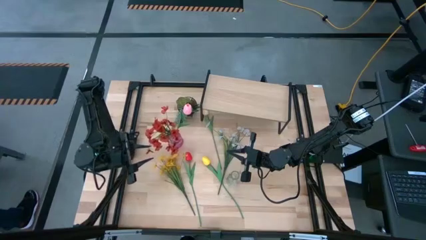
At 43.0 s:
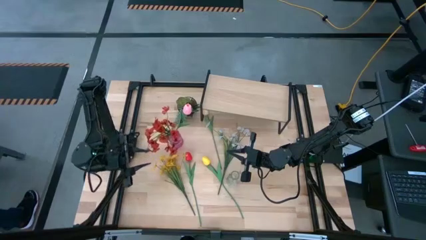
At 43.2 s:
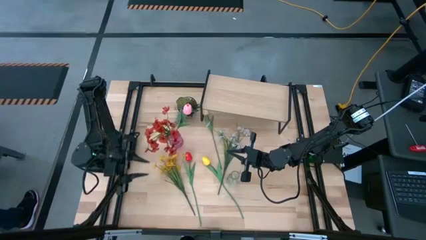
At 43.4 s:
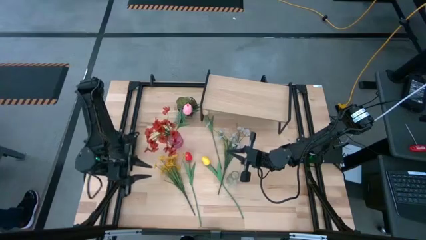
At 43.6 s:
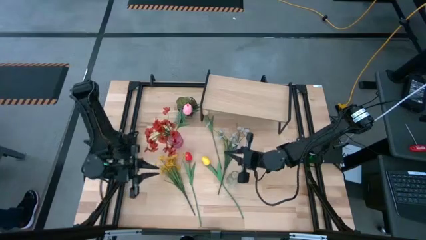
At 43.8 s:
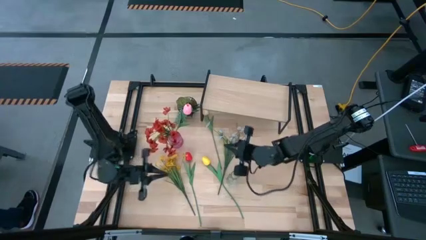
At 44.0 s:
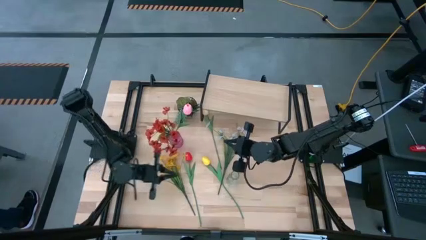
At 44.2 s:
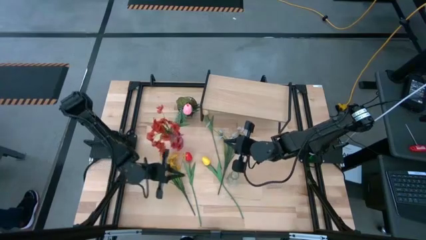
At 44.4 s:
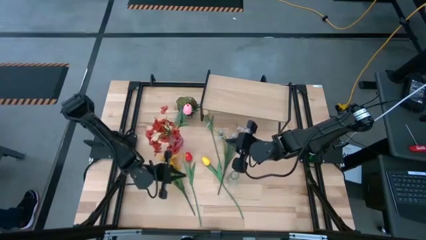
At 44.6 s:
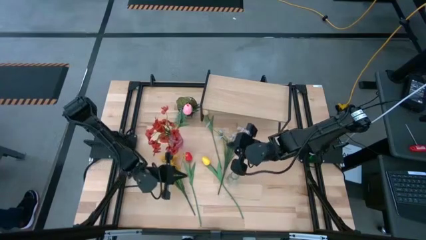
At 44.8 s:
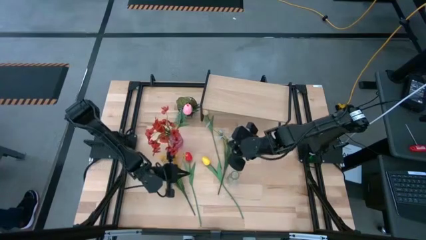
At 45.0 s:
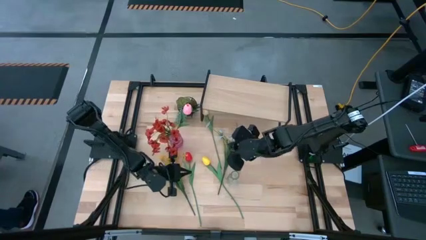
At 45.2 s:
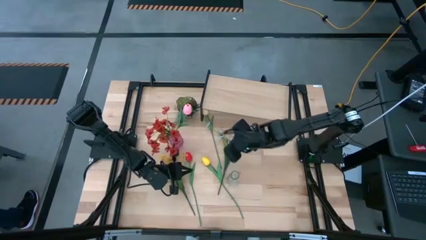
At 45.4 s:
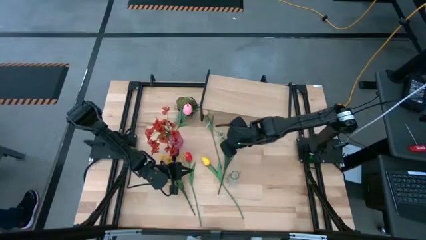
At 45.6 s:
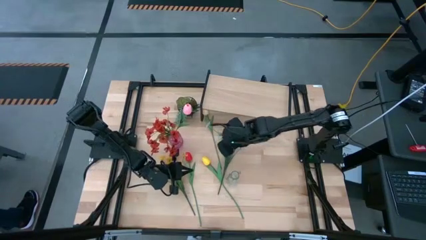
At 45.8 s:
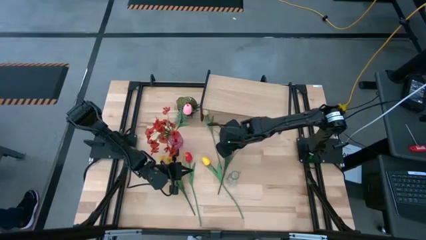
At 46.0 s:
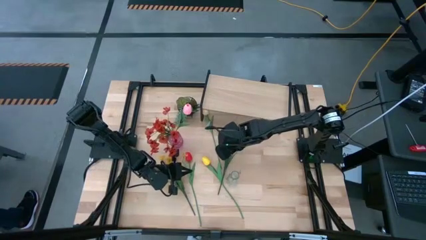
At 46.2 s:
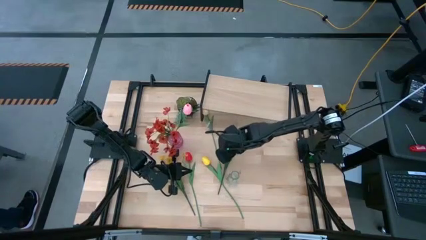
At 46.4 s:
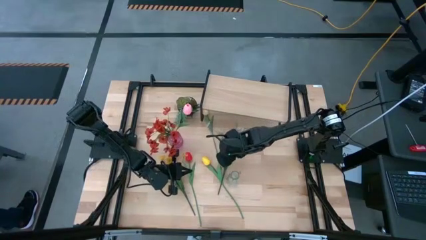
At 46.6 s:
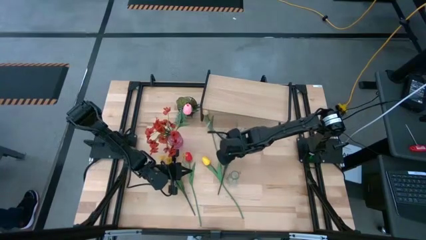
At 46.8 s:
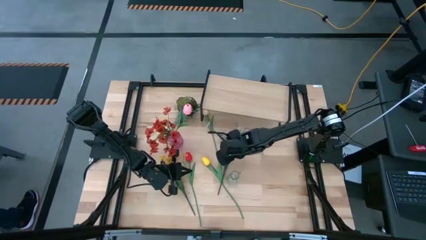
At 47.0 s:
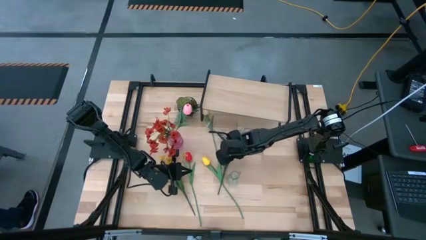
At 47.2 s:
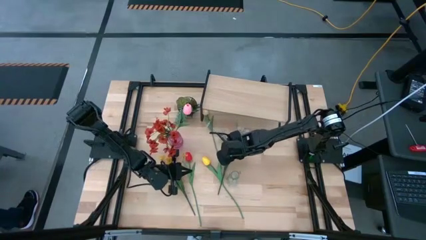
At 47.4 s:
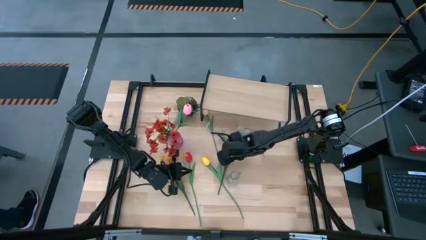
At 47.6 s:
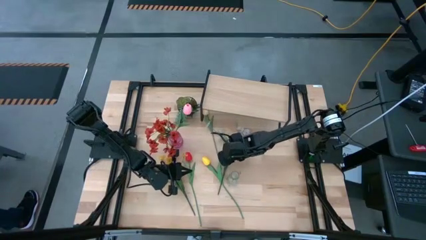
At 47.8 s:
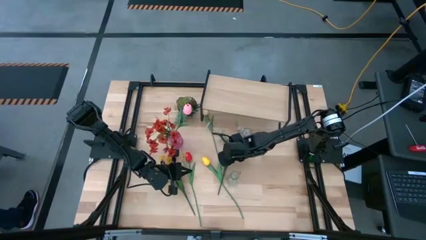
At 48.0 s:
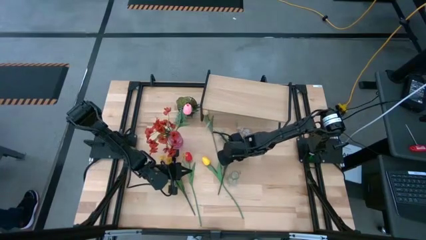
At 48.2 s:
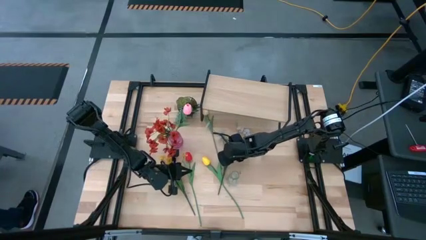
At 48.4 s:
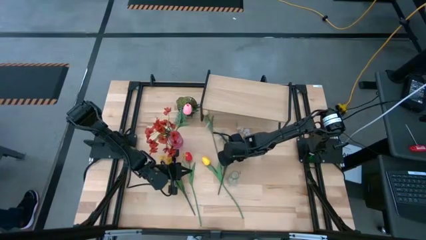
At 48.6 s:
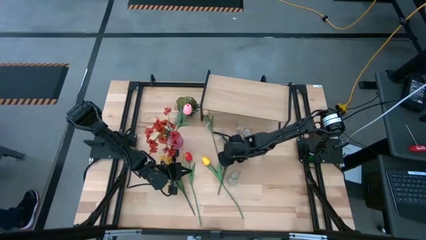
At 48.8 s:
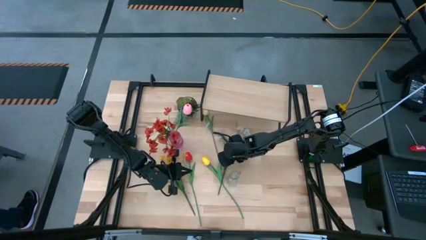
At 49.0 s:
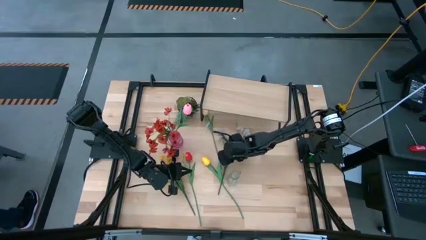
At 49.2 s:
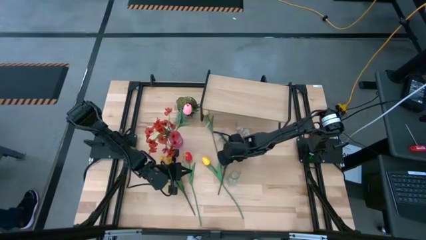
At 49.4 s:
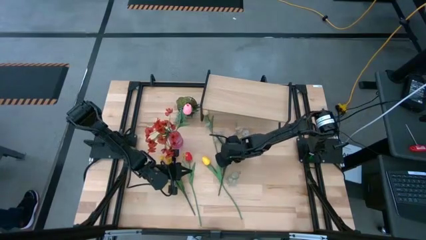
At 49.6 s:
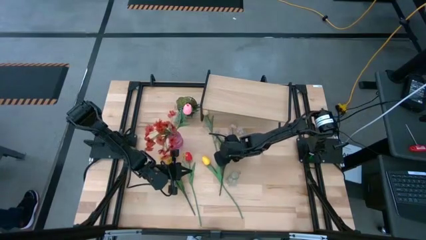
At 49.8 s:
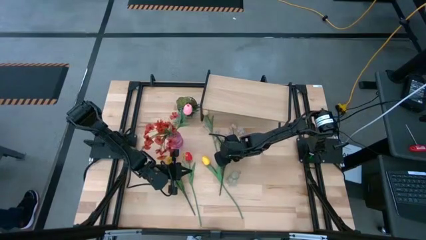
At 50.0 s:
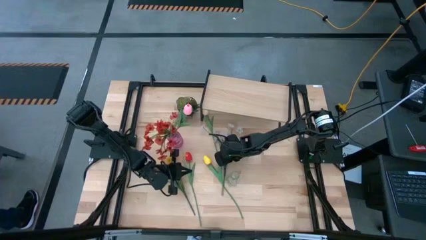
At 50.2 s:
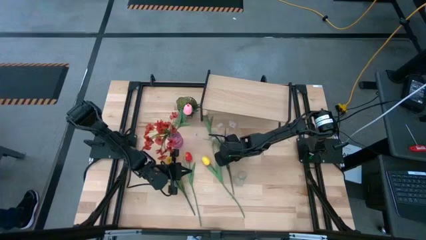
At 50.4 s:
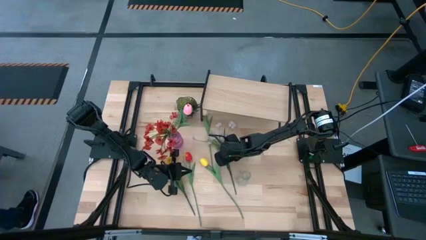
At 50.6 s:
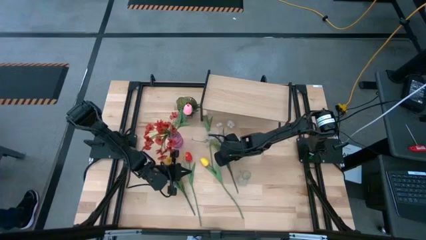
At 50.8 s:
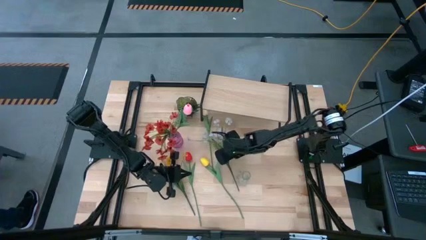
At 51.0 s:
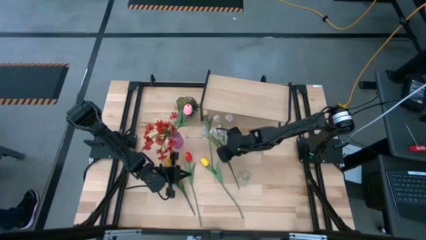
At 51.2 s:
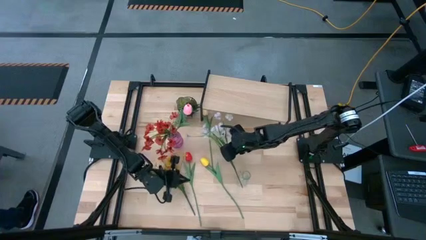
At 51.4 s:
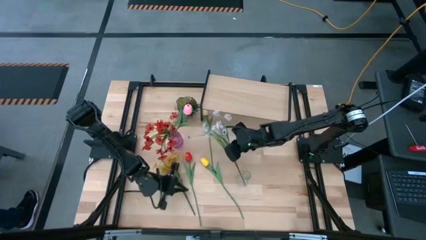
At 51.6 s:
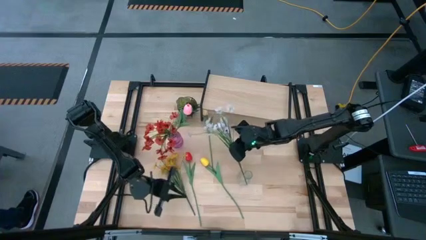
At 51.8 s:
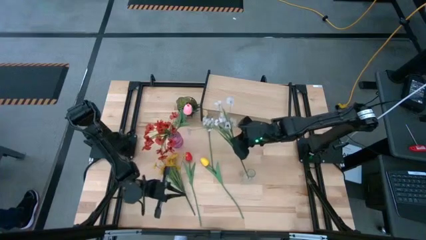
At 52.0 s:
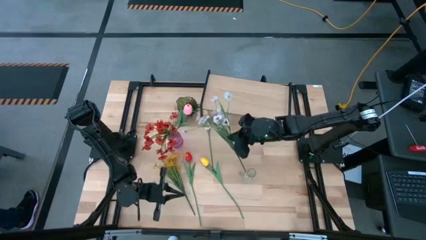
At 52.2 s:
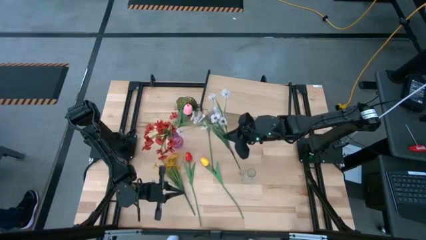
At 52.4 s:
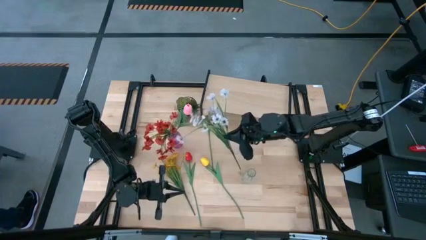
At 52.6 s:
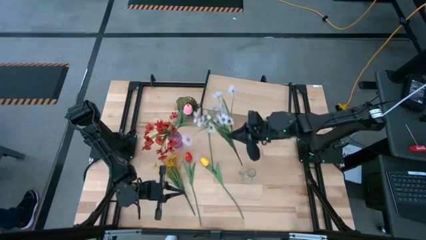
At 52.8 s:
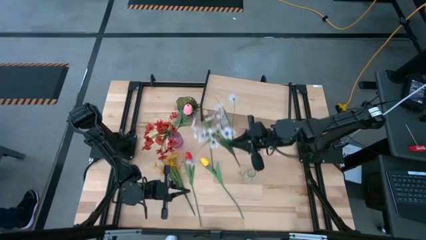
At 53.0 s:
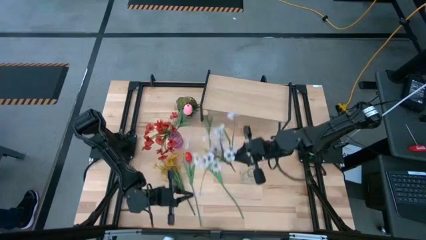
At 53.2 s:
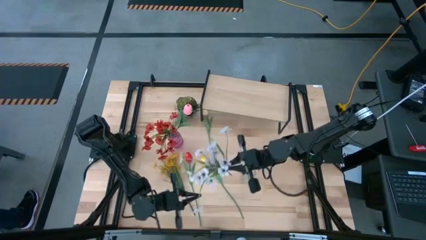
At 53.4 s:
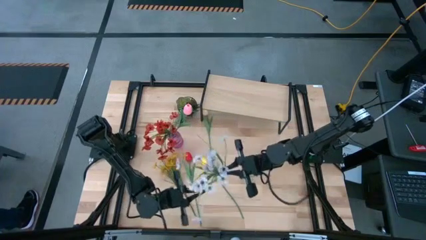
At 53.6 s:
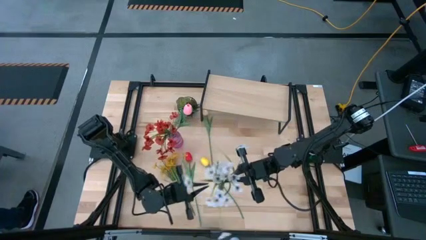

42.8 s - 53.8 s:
Task: Pick and place flowers into a vace then onto a shelf
Put the white flowers into the violet vase

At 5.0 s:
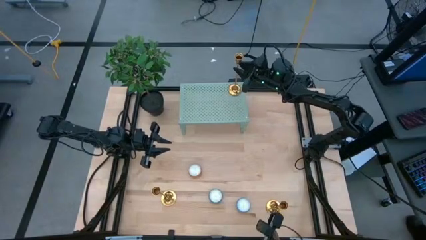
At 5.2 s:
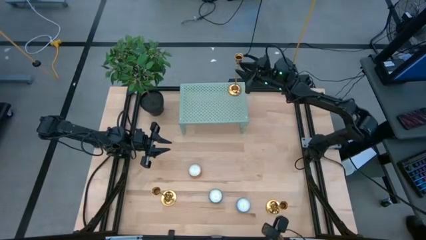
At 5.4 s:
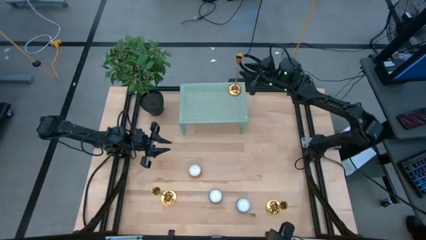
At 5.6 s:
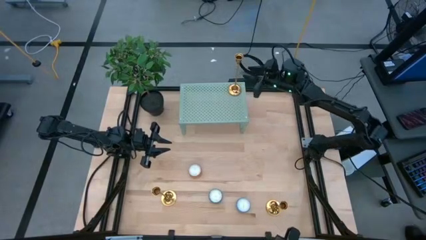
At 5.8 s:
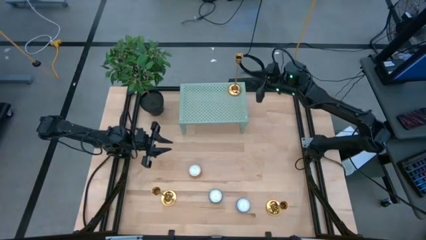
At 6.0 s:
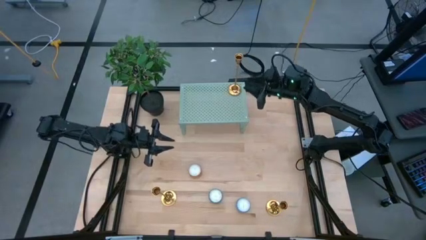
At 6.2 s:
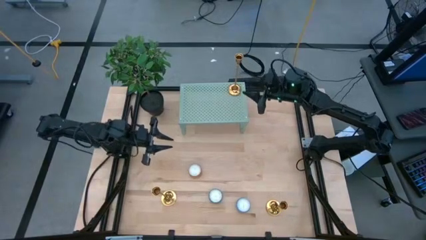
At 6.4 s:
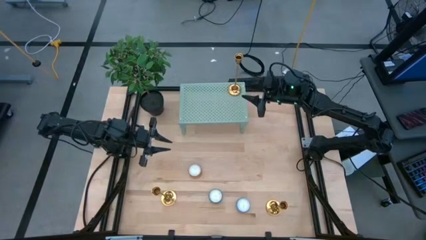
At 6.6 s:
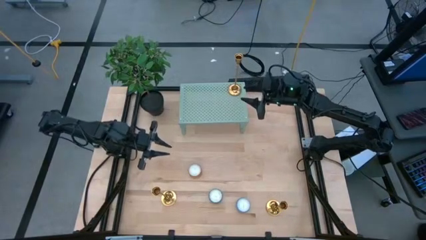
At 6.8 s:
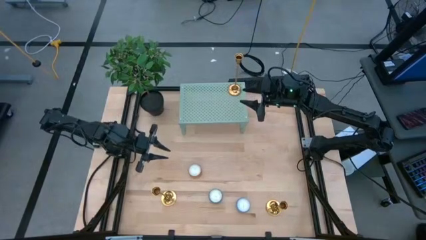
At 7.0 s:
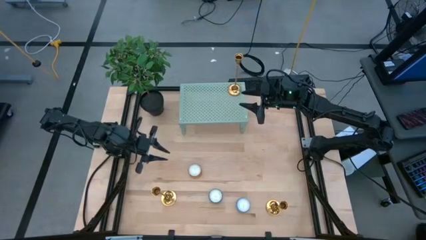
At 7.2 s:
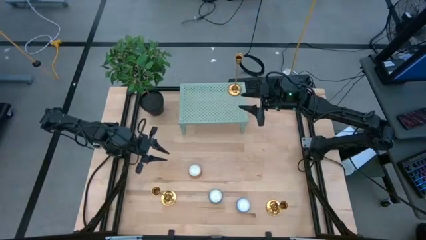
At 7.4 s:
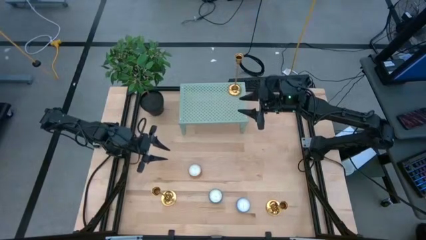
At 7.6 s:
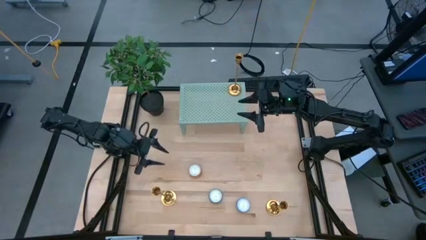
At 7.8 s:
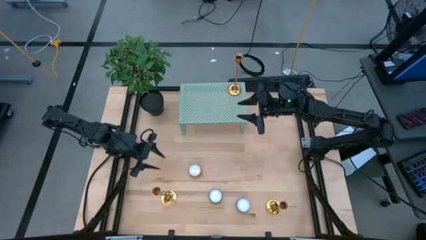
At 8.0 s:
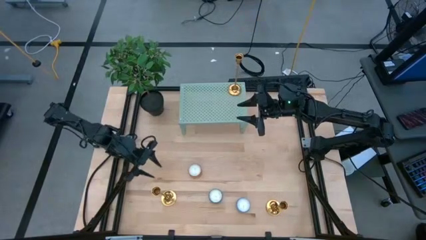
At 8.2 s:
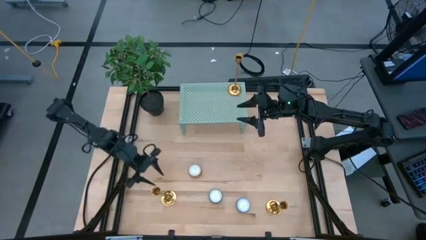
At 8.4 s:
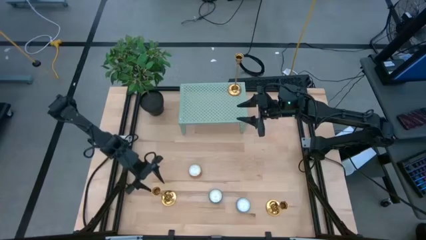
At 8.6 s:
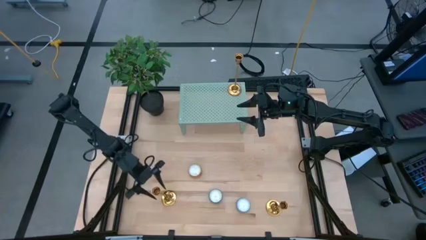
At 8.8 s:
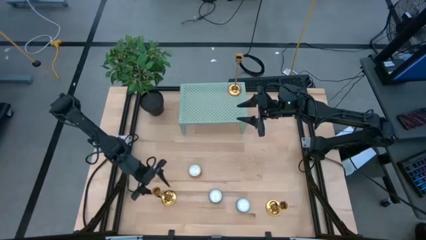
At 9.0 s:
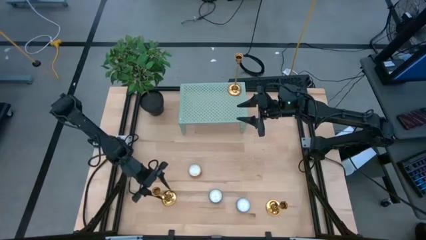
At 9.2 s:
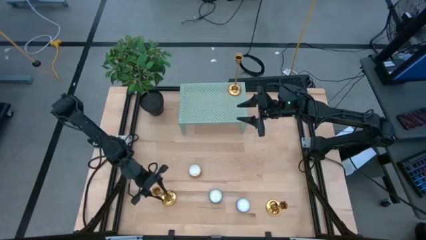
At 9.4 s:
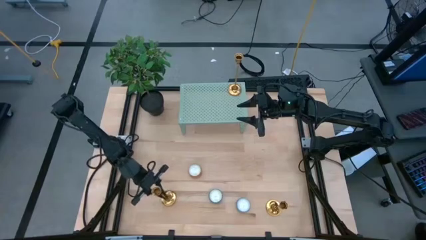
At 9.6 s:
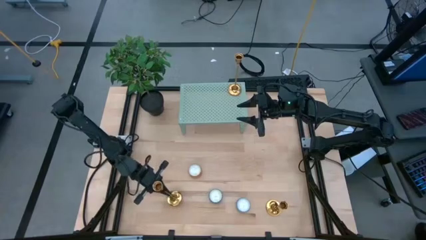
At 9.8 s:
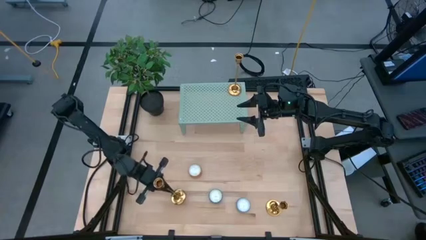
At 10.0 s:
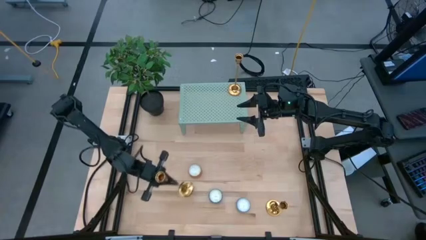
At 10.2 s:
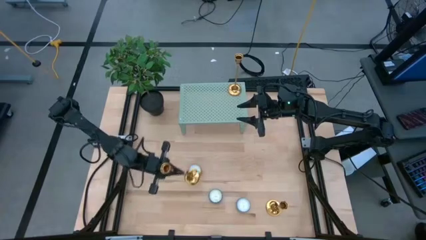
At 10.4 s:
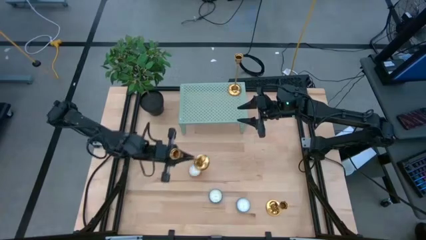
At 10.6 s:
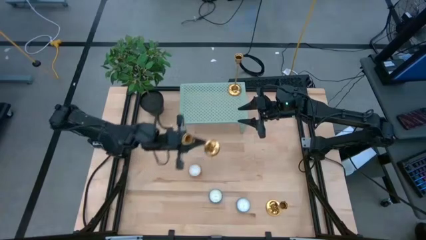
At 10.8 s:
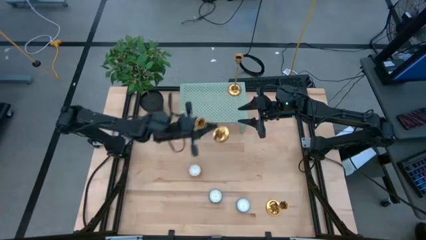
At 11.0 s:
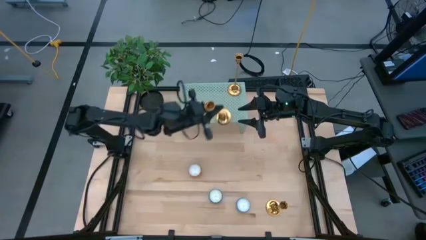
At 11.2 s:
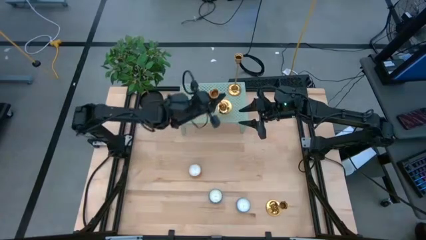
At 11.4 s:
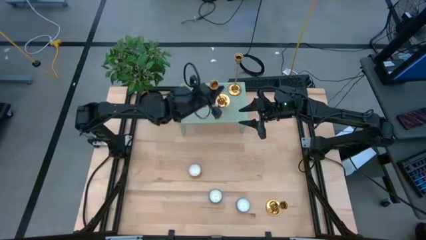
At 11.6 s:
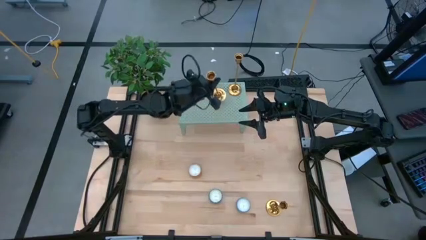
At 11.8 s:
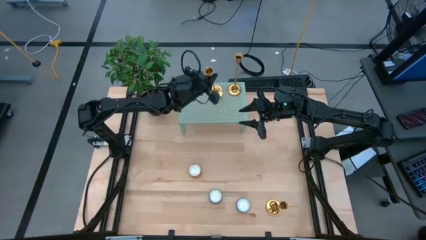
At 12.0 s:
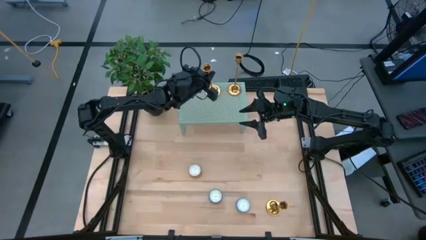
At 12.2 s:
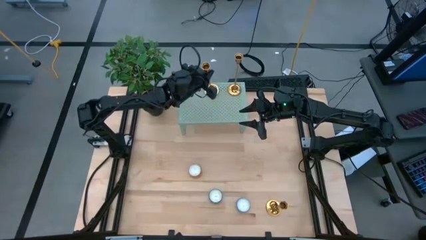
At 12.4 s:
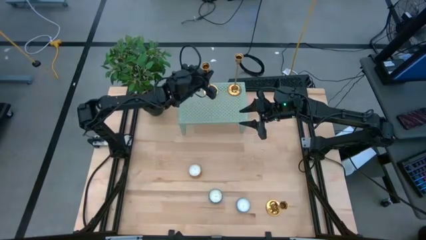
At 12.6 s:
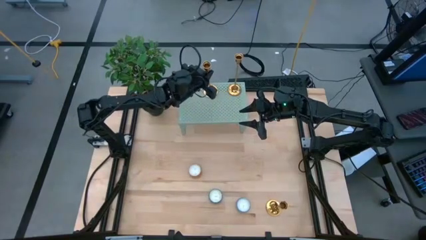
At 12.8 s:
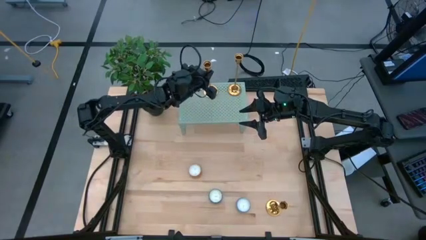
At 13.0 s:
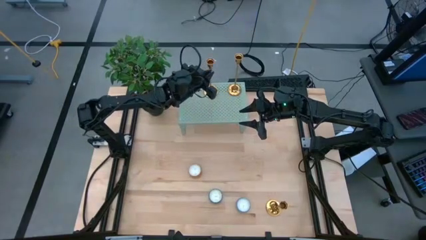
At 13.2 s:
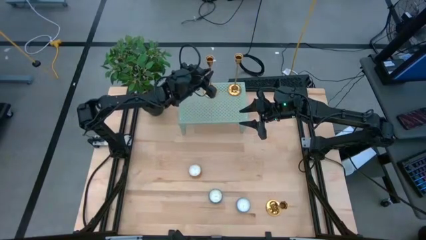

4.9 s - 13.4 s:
Task: Pick & Place candle stick holders
Put the left gold candle holder on the shelf
